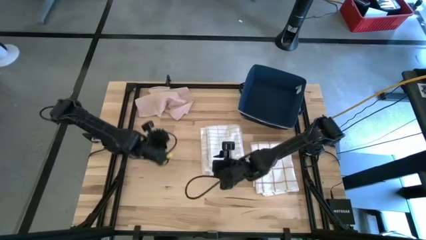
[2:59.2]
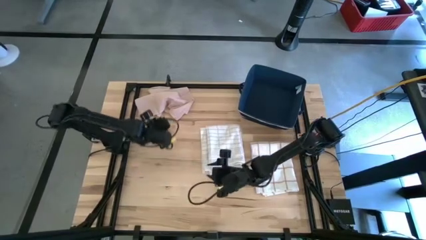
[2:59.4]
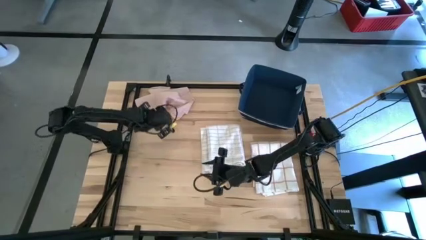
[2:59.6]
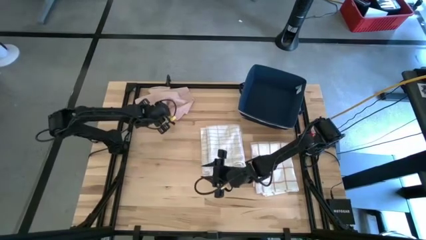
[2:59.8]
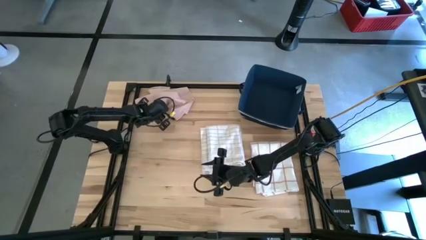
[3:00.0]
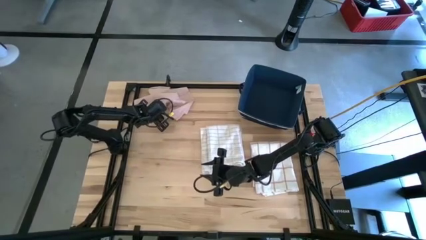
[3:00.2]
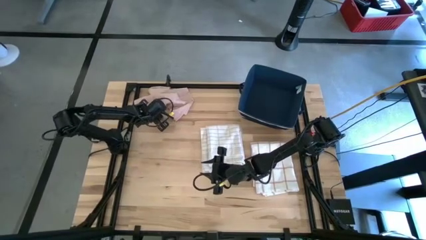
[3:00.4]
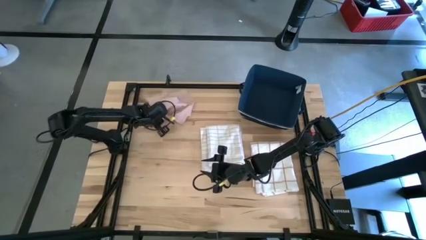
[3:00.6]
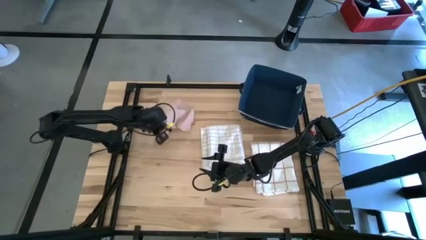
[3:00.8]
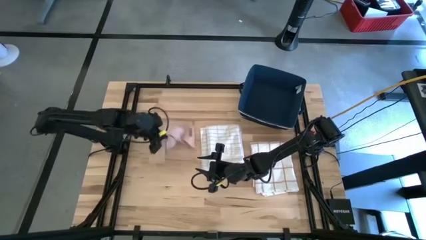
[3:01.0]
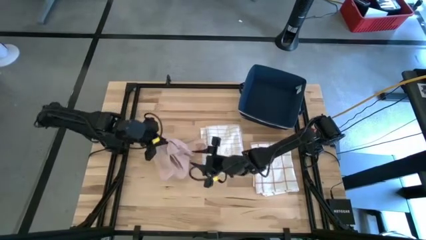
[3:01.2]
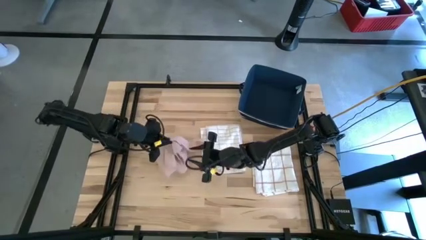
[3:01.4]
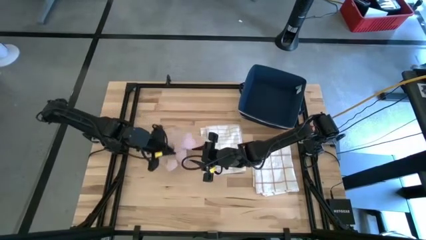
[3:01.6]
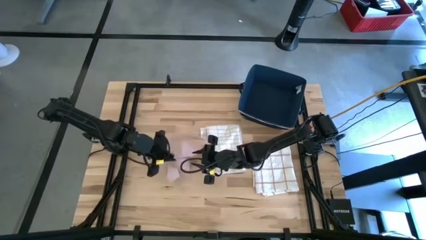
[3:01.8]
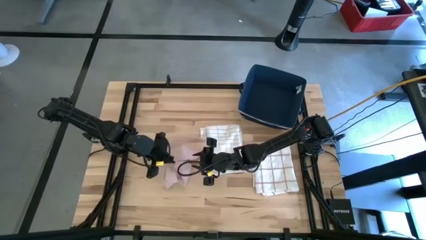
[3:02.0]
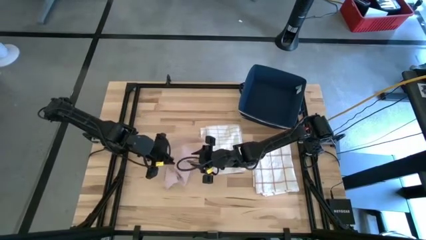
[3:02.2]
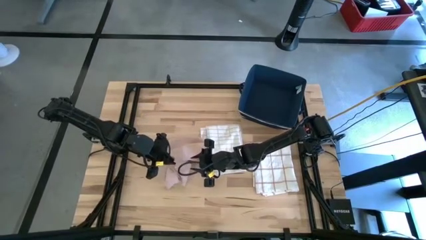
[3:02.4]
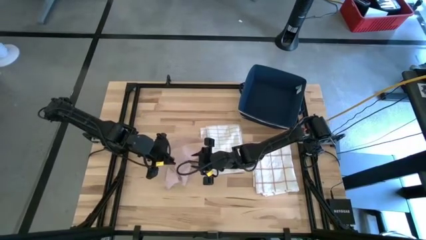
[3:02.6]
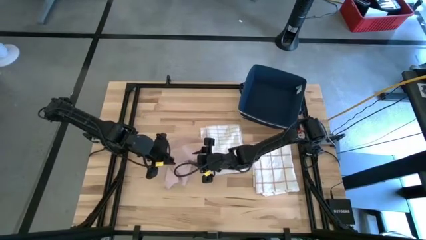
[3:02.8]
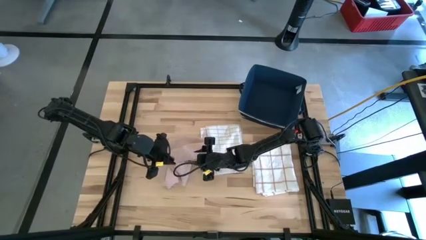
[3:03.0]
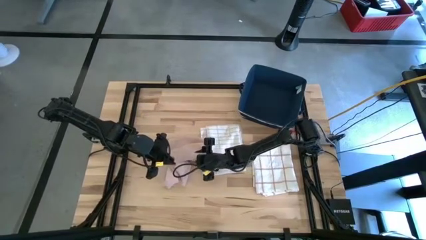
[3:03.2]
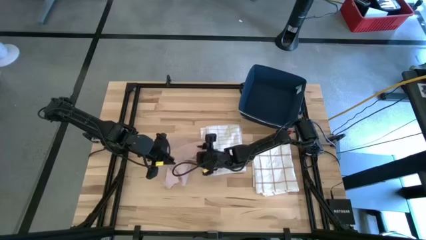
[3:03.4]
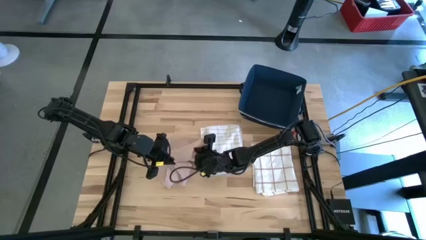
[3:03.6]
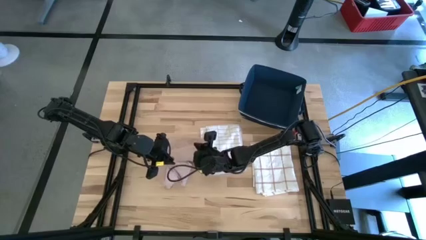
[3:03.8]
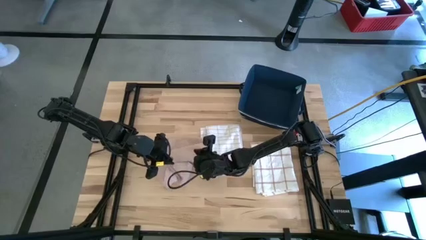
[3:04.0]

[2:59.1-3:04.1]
Task: Fold towel
Fold the light pink towel

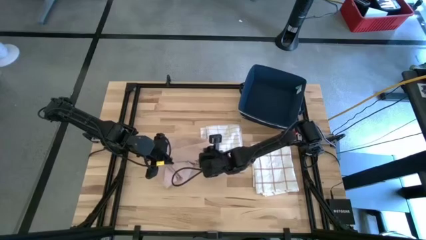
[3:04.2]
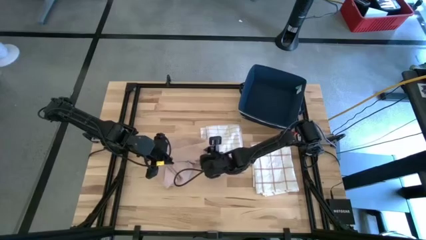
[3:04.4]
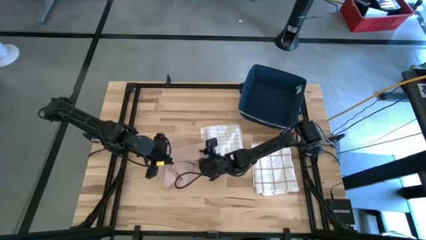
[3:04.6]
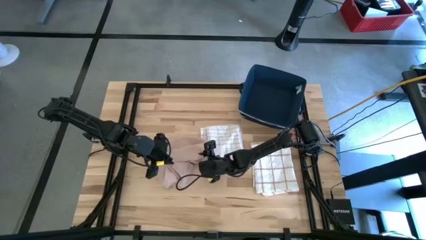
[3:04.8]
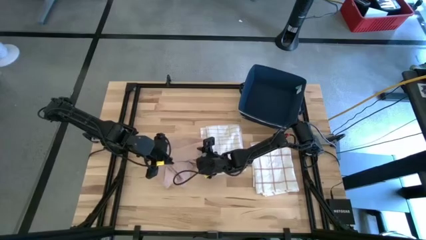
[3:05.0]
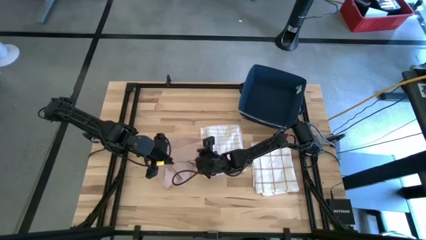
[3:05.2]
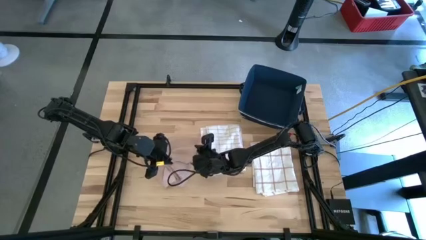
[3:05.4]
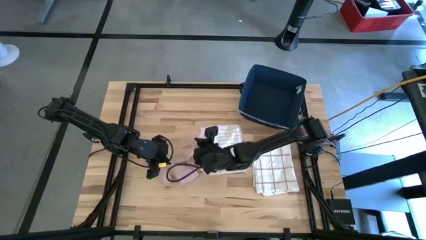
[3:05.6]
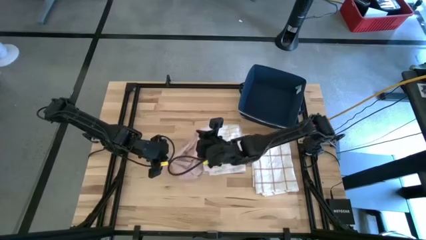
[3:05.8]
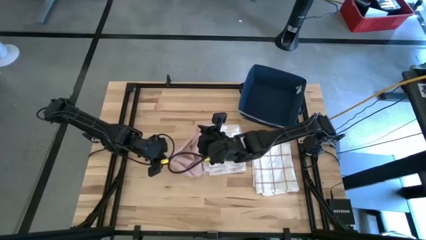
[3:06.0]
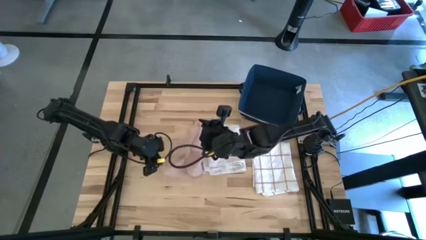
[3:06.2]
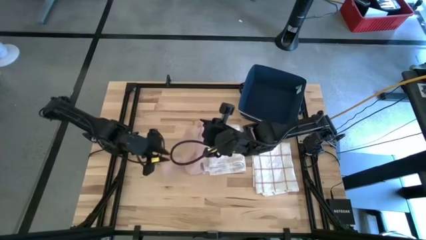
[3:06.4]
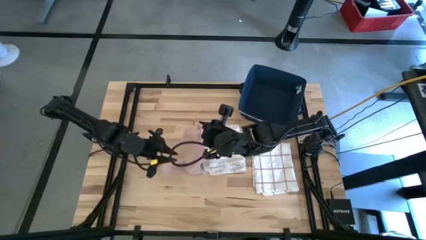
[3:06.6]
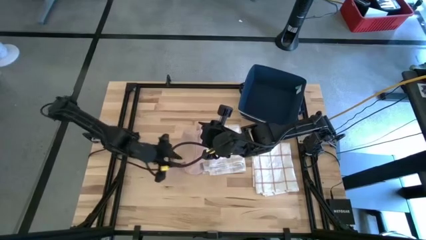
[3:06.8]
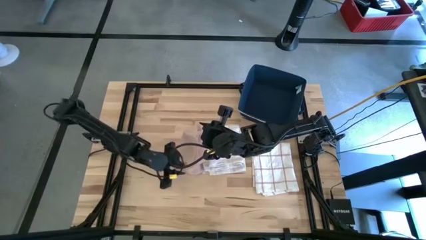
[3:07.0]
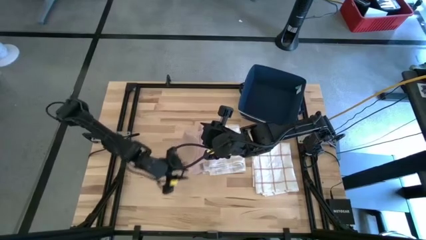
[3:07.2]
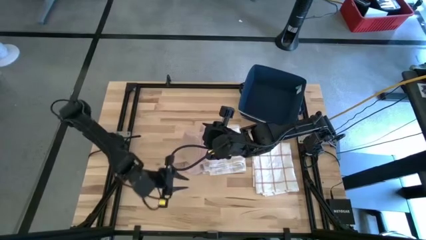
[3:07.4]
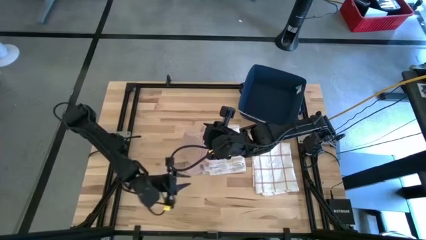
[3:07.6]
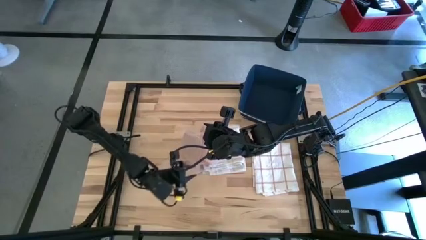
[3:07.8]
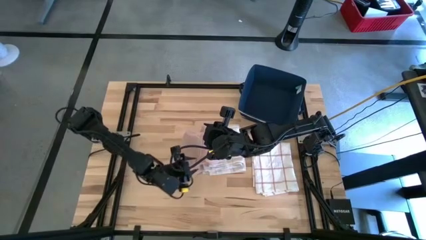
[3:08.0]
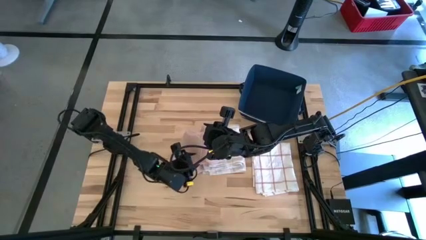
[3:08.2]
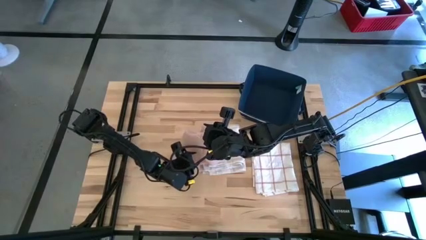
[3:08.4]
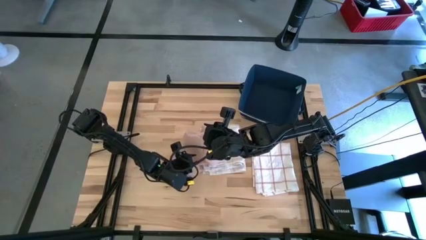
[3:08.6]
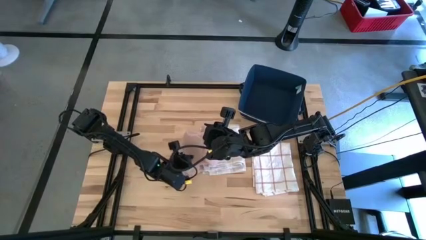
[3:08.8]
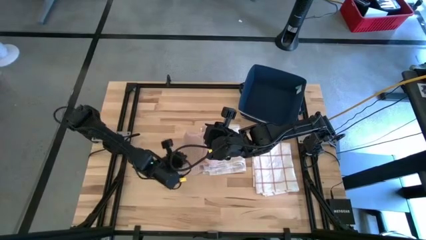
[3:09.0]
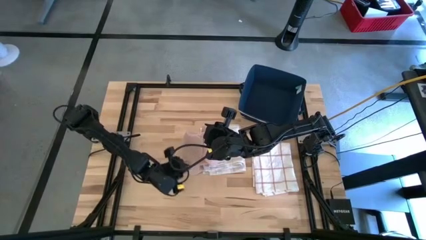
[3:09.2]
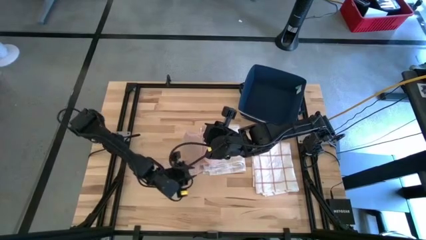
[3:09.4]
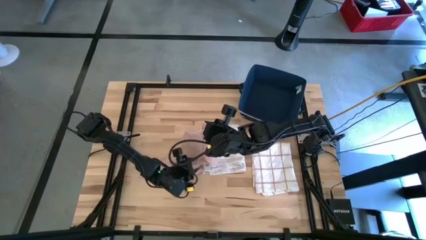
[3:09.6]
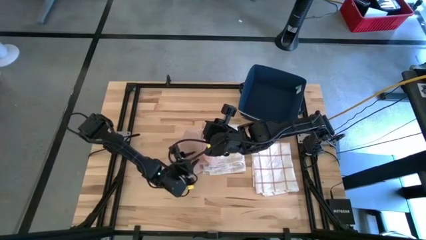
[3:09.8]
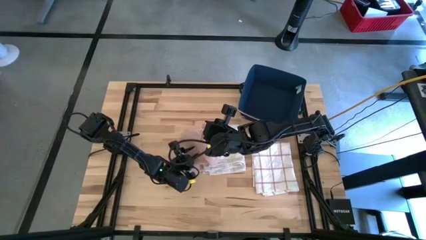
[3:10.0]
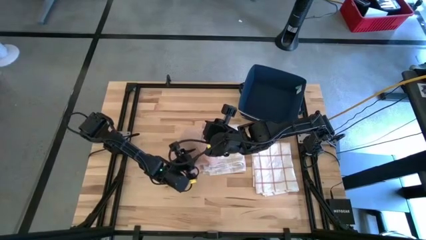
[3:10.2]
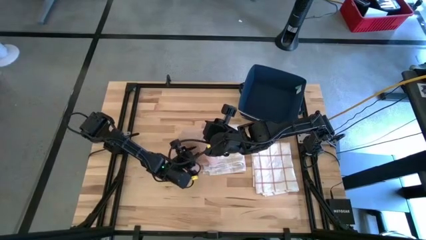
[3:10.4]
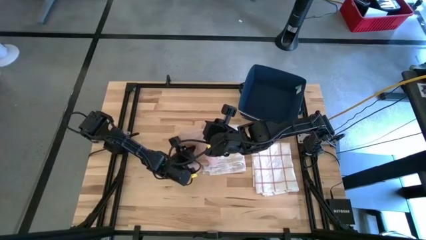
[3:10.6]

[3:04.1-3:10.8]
Fold the light pink towel

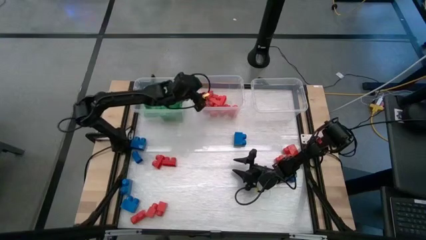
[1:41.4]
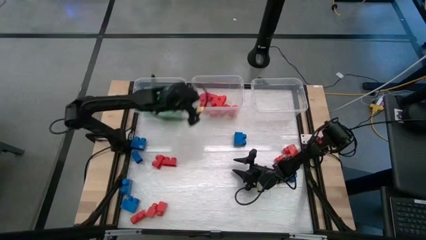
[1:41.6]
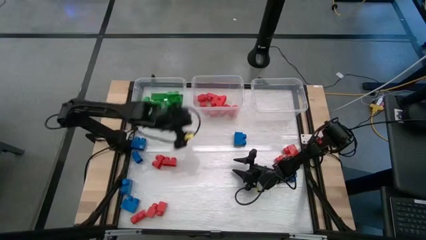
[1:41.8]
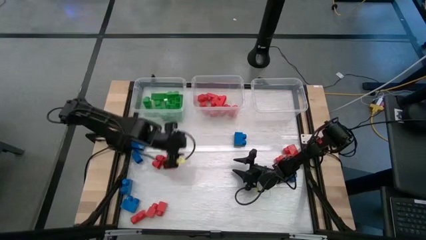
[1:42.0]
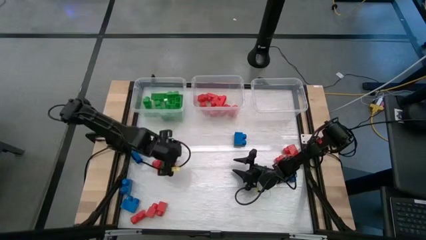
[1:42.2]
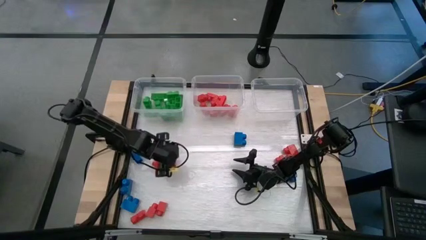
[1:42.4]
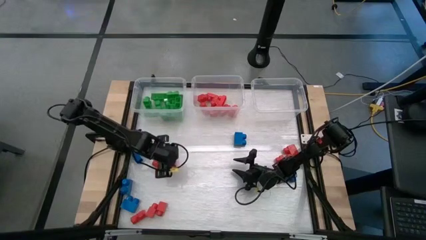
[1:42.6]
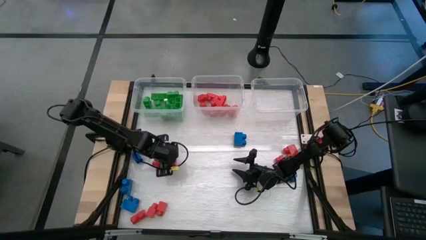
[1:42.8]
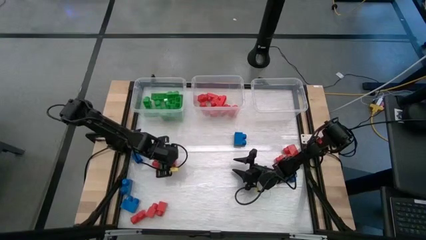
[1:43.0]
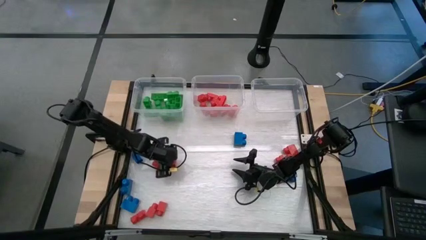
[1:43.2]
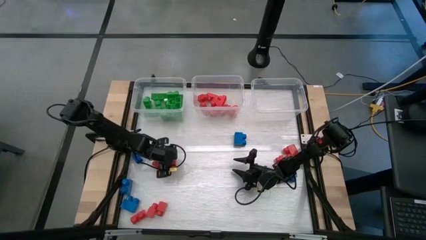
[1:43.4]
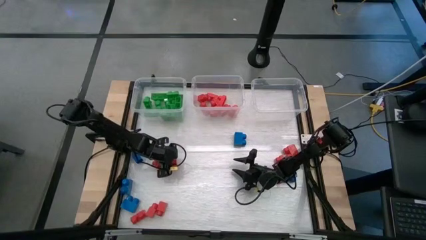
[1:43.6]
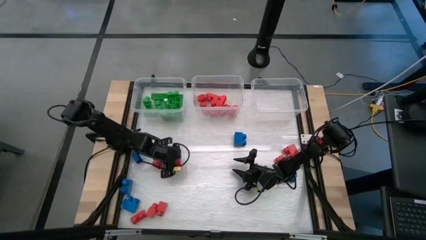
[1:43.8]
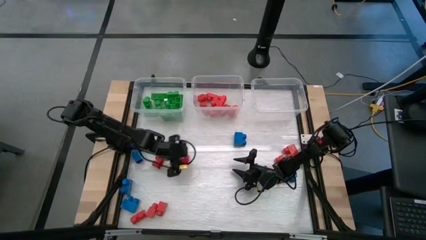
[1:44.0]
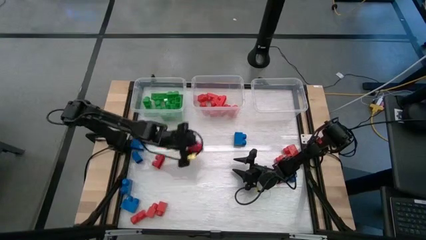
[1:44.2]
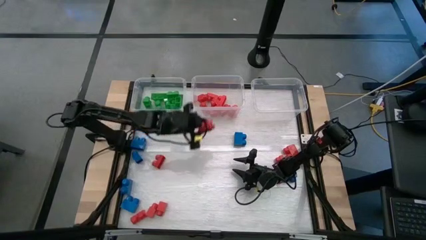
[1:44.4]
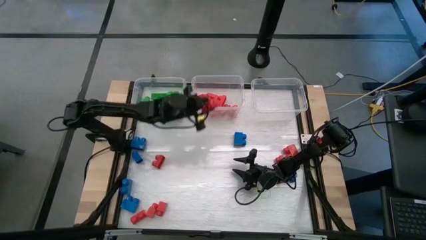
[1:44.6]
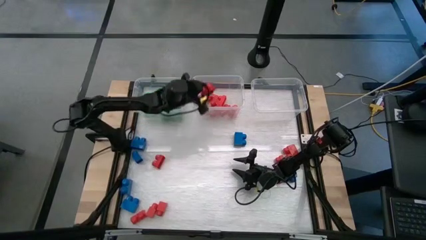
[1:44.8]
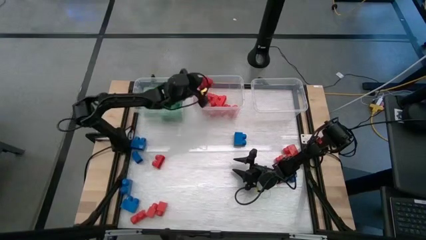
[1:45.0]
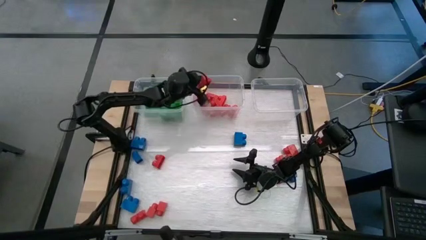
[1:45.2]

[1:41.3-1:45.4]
Task: Sort blocks
Put the red game piece into the middle transparent bin

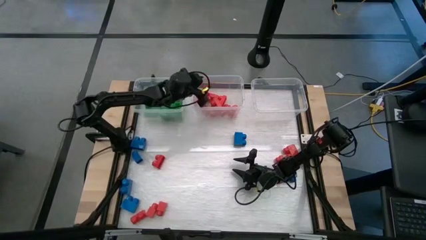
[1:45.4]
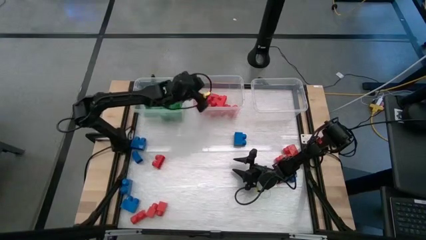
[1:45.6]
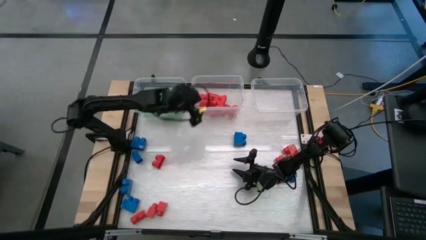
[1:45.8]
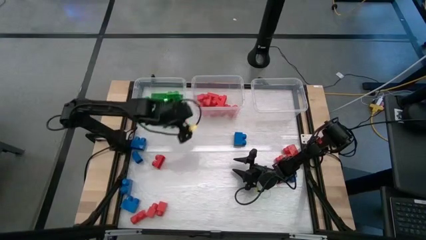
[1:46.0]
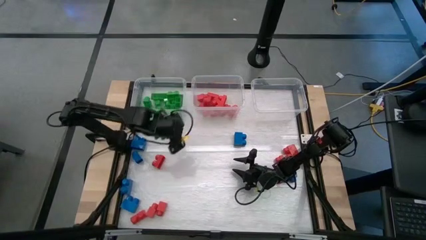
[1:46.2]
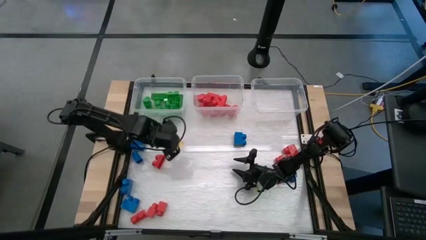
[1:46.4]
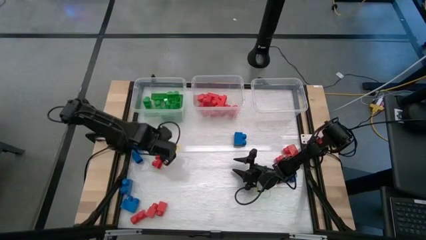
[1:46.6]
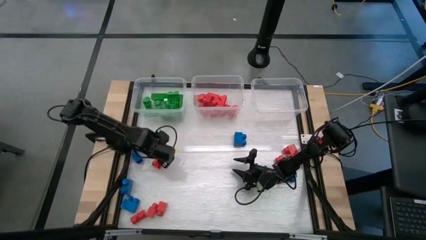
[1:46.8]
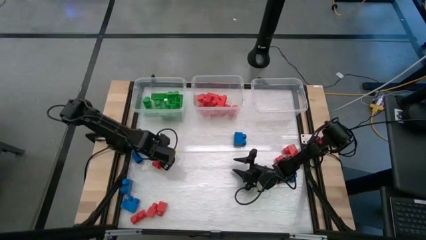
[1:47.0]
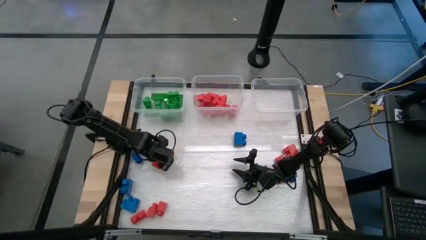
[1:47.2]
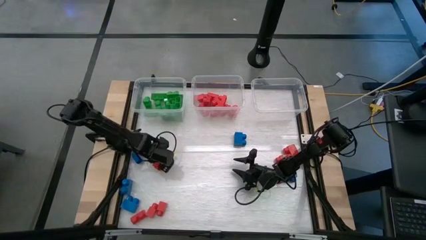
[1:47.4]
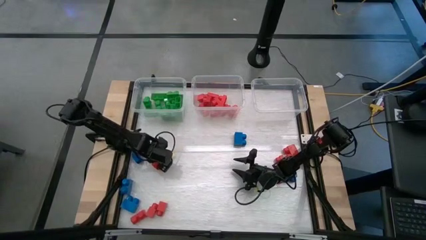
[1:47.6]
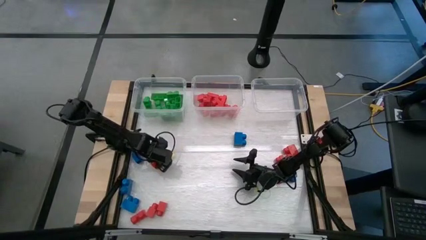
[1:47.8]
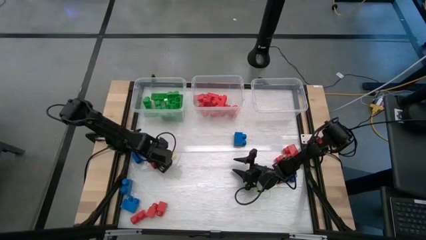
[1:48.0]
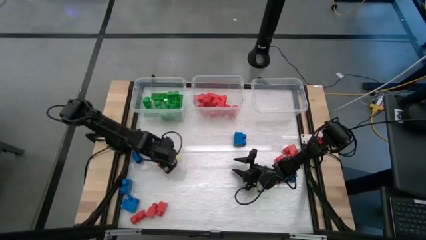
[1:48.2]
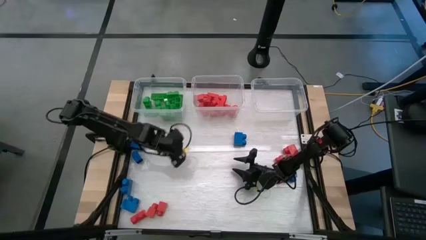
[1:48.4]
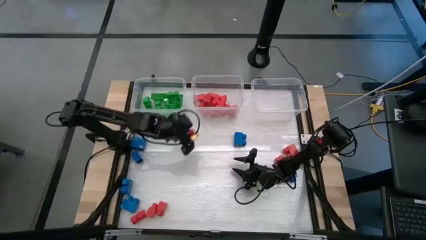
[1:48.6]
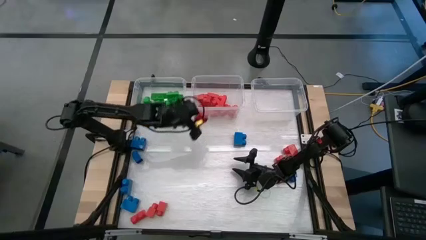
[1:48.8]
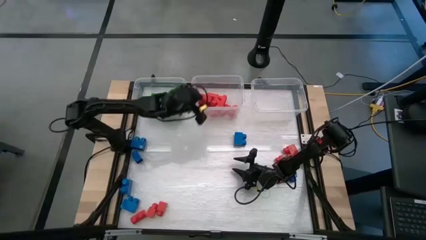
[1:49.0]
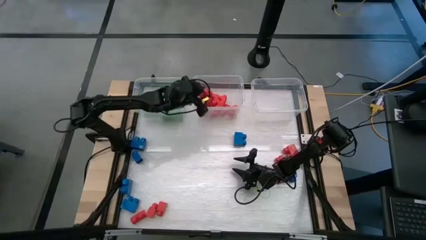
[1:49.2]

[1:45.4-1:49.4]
Put the red game piece into the middle transparent bin
